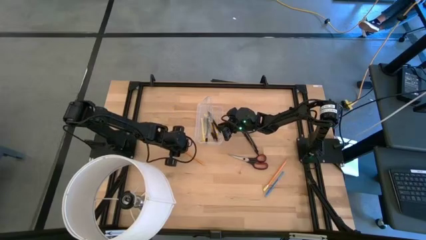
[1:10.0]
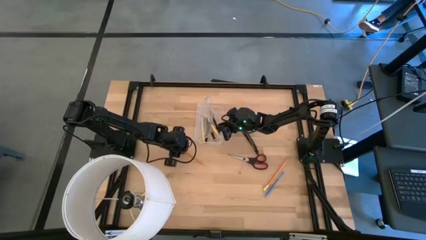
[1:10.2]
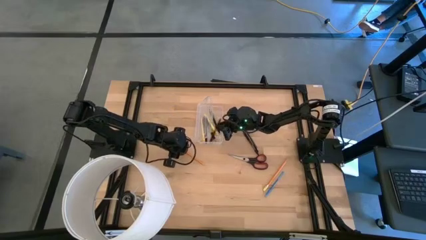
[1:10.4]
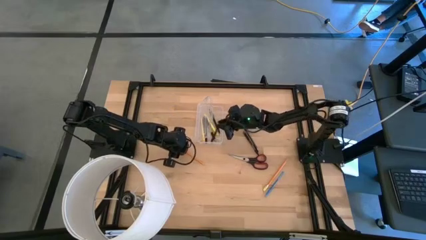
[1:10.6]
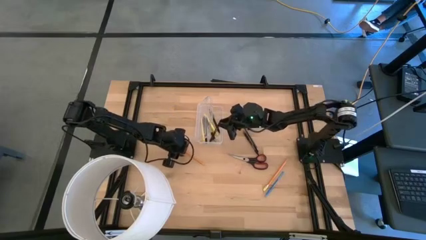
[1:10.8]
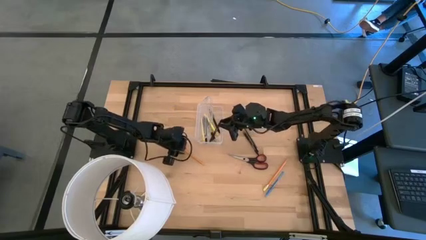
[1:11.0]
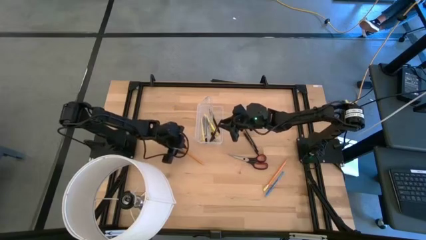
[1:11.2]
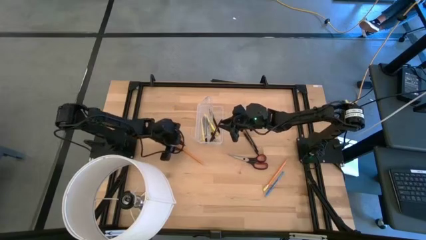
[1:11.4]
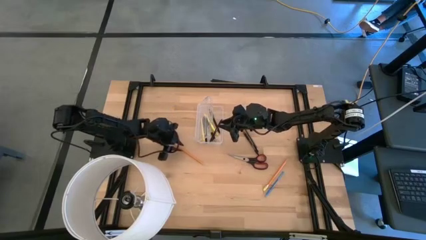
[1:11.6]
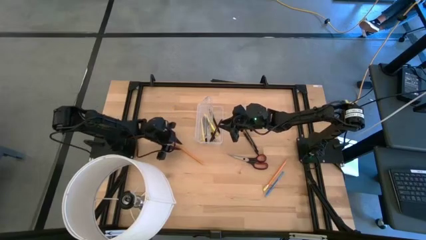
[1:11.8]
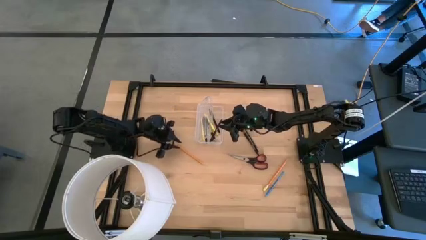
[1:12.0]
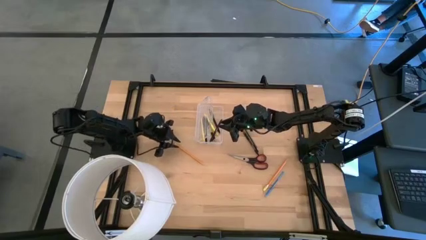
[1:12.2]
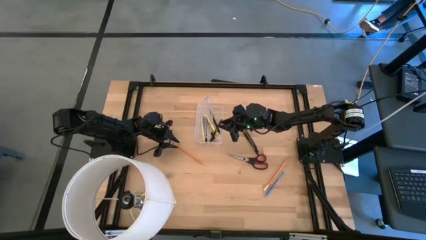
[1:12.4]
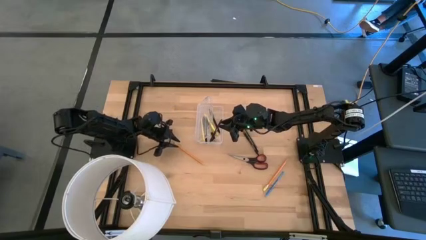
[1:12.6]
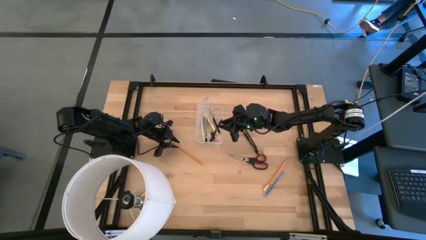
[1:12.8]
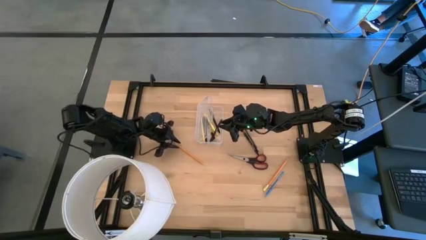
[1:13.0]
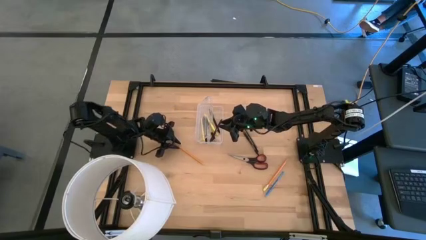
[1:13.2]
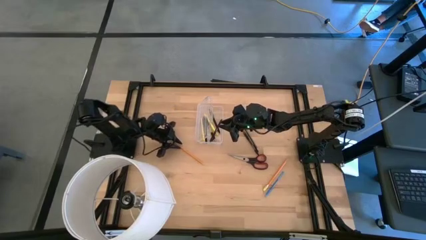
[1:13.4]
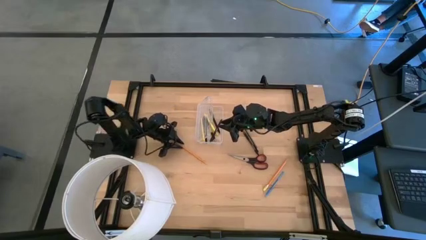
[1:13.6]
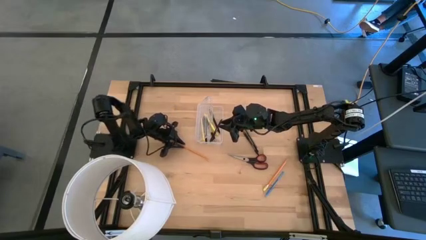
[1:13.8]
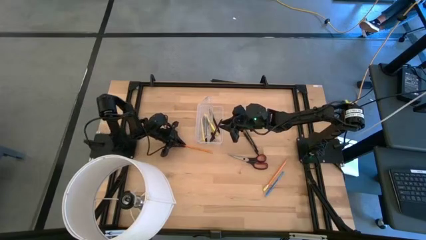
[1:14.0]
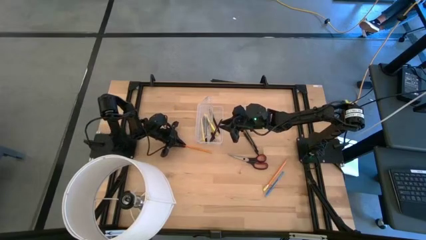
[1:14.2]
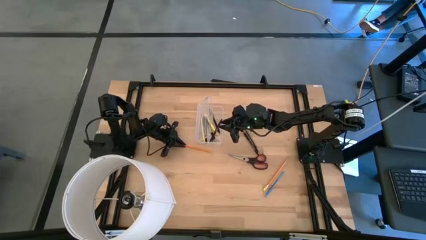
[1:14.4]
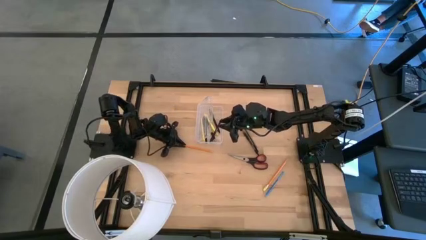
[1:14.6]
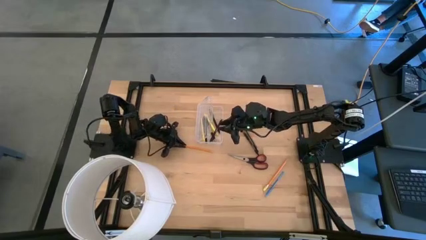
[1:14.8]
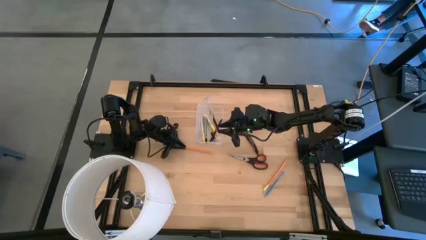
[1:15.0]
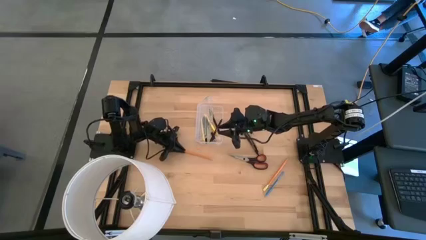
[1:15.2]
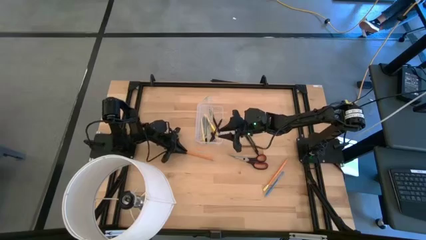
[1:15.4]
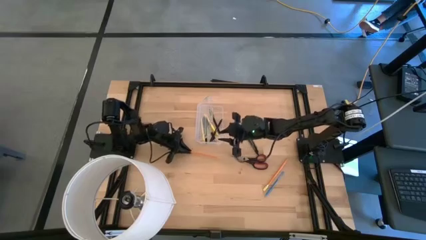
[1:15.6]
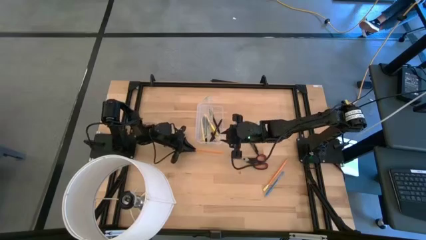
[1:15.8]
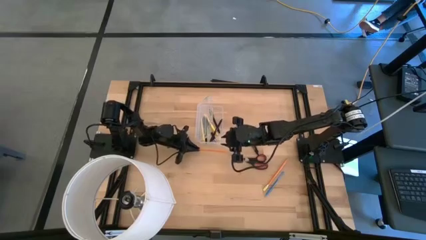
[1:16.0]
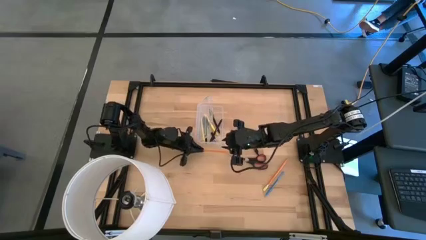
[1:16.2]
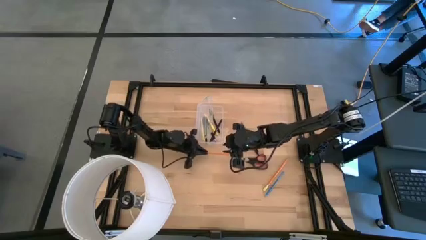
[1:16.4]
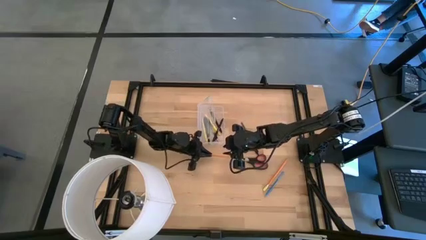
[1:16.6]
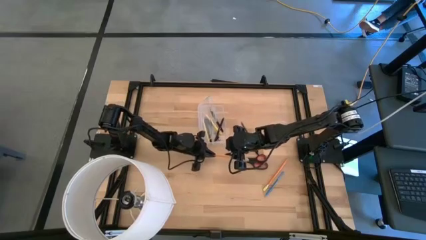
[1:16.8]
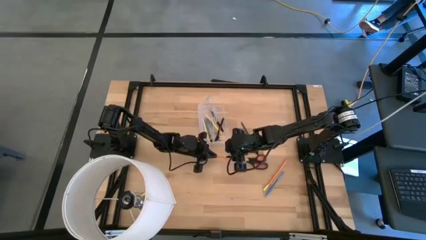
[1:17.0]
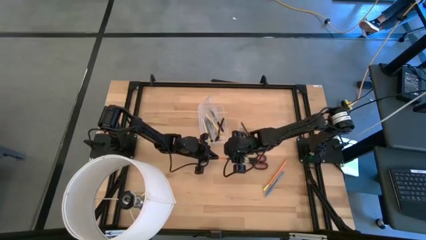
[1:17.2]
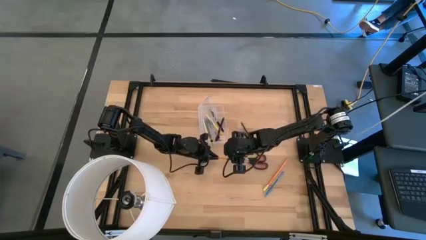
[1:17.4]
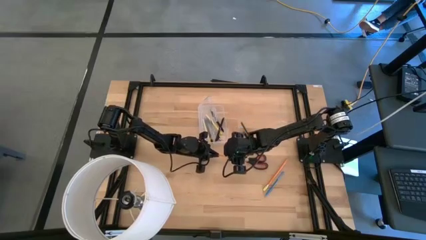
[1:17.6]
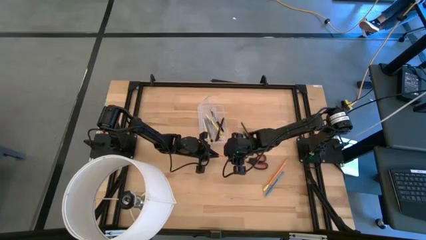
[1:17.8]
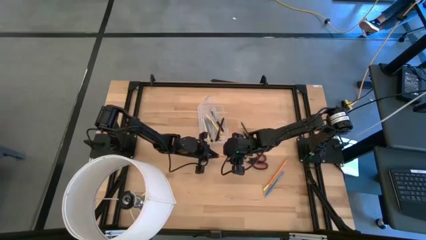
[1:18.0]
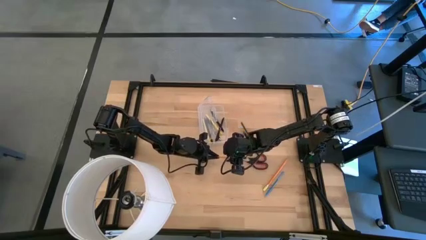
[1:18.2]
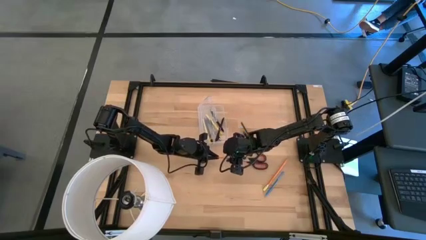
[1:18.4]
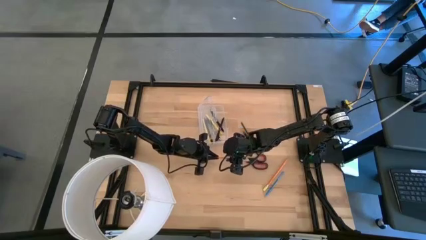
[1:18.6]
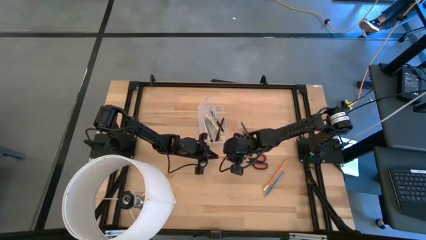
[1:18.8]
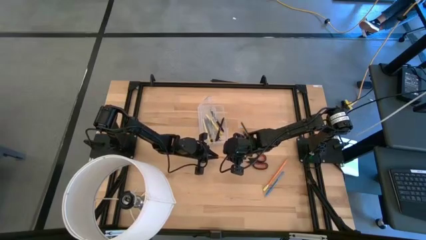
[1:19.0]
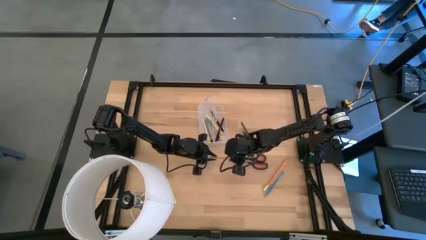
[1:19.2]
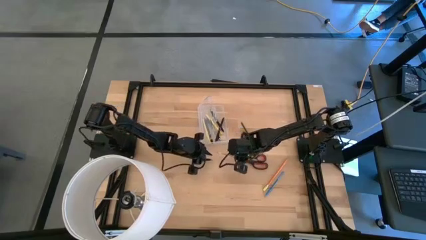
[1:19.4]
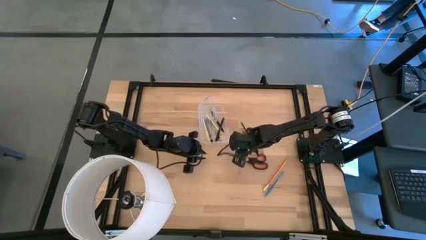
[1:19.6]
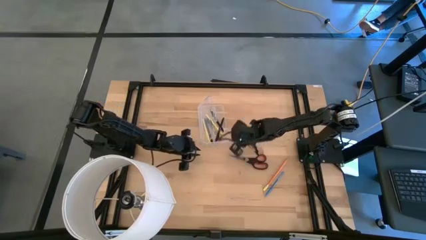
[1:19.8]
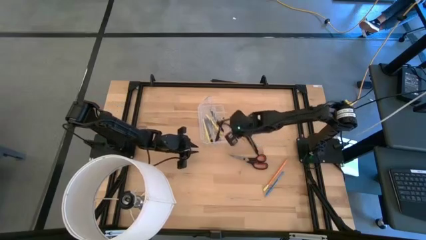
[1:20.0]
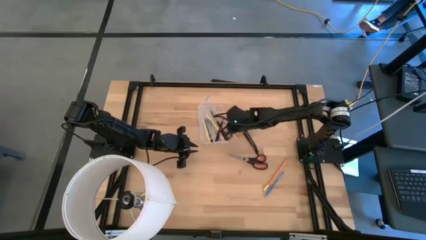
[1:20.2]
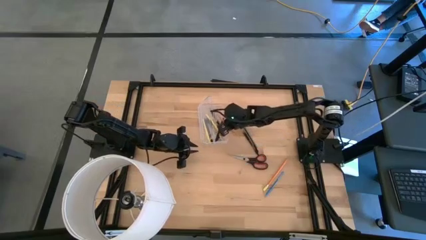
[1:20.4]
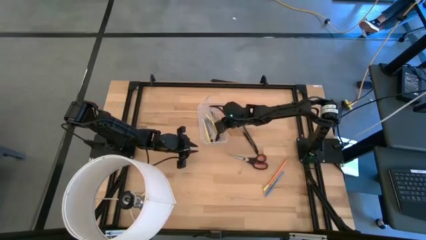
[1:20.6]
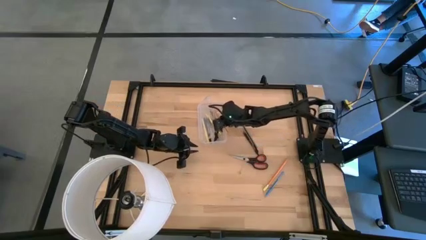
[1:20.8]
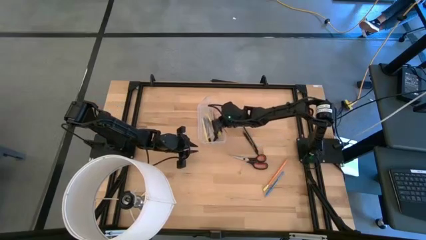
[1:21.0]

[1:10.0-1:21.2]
Task: Pick & place school supplies into a supply box
Put the left orange pencil into the transparent supply box

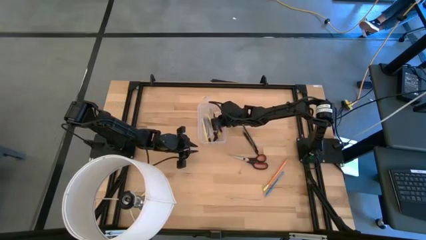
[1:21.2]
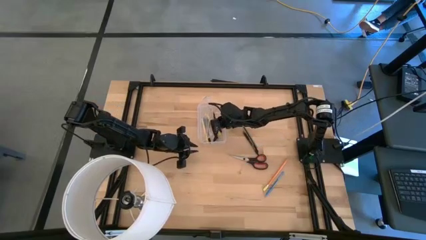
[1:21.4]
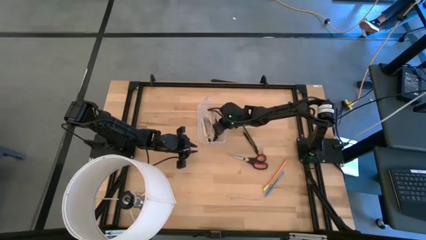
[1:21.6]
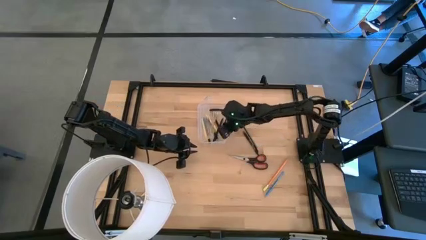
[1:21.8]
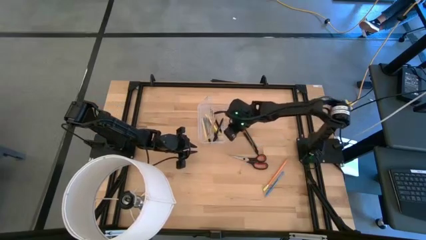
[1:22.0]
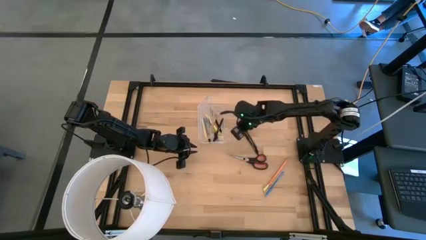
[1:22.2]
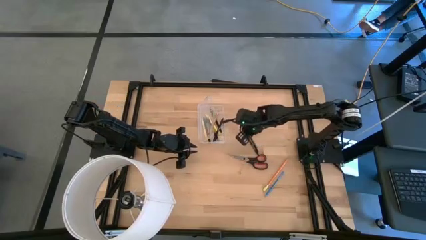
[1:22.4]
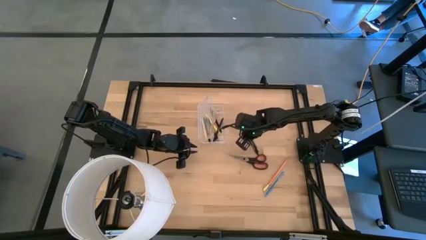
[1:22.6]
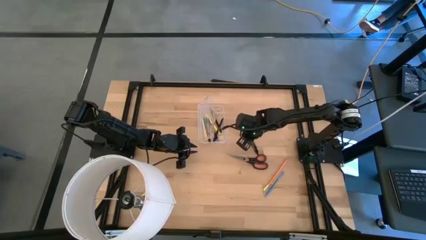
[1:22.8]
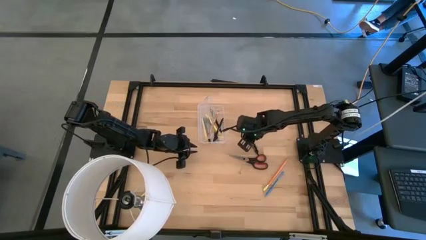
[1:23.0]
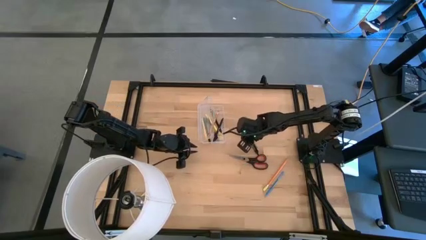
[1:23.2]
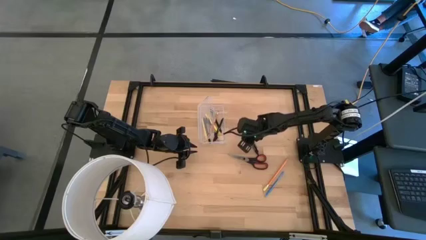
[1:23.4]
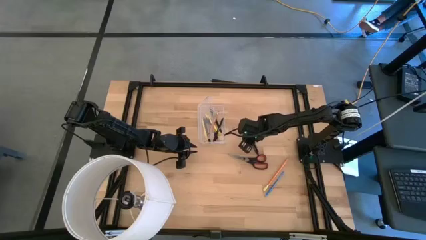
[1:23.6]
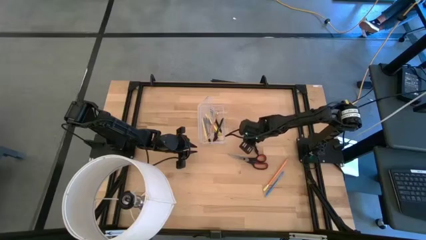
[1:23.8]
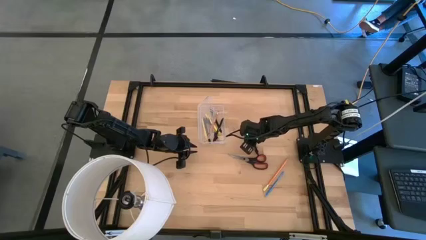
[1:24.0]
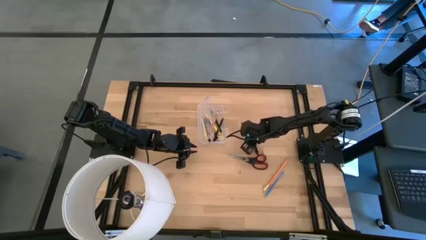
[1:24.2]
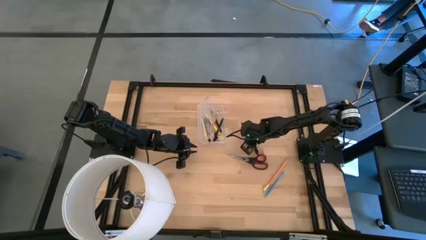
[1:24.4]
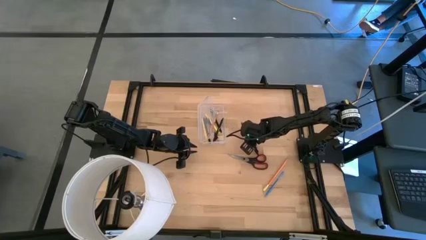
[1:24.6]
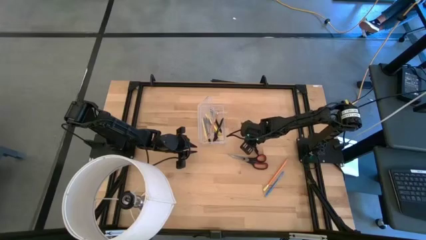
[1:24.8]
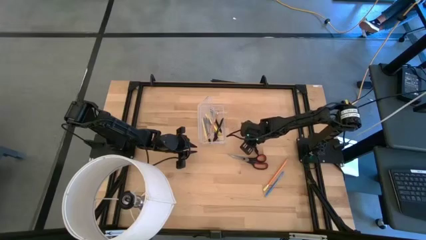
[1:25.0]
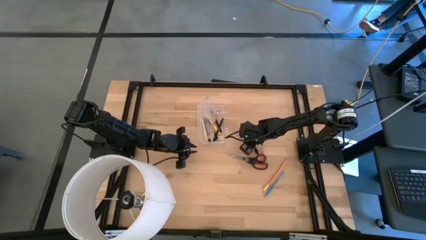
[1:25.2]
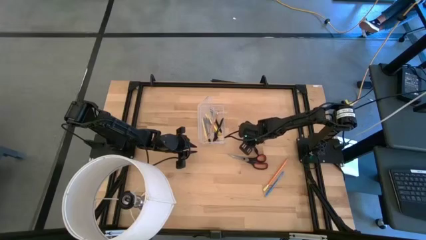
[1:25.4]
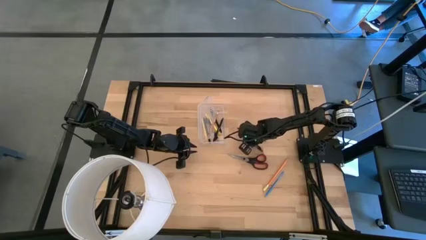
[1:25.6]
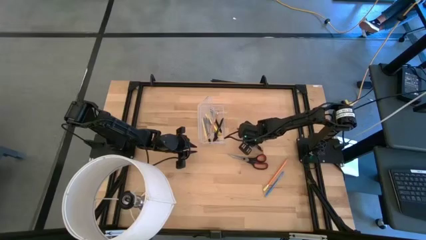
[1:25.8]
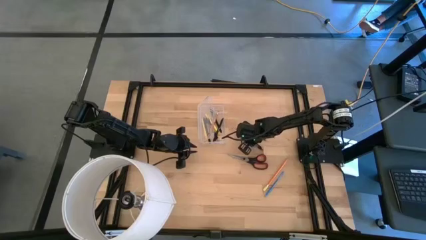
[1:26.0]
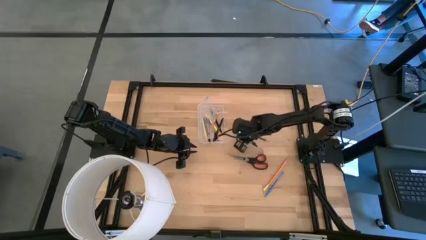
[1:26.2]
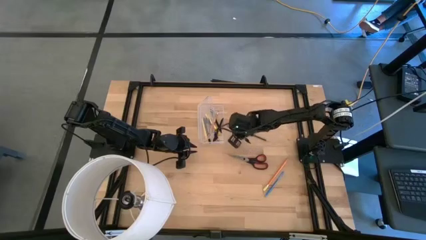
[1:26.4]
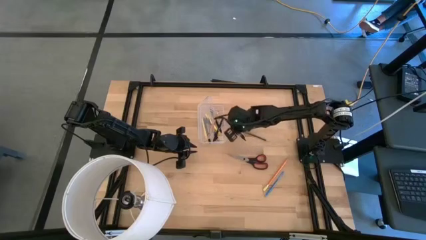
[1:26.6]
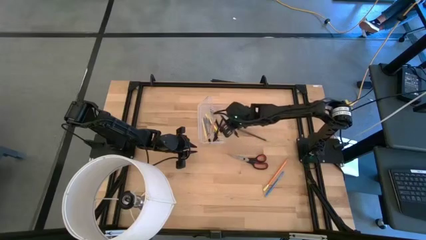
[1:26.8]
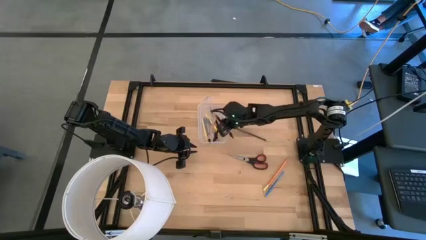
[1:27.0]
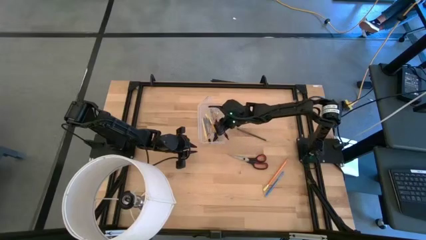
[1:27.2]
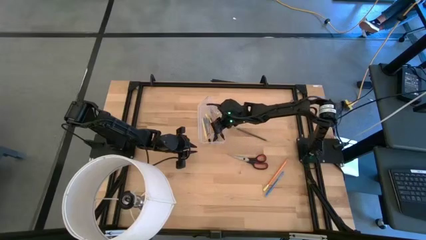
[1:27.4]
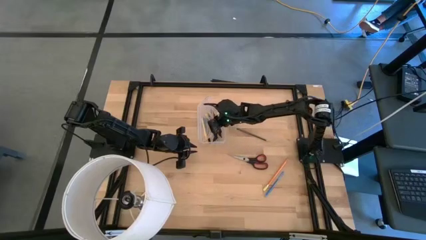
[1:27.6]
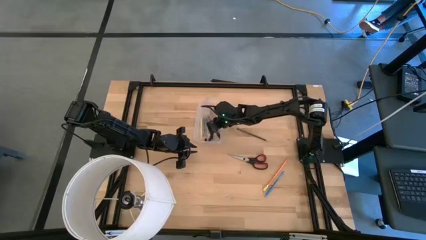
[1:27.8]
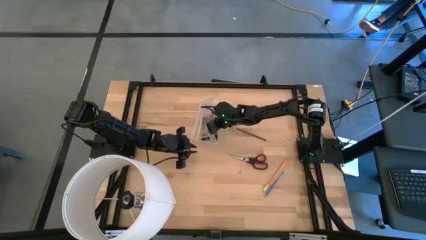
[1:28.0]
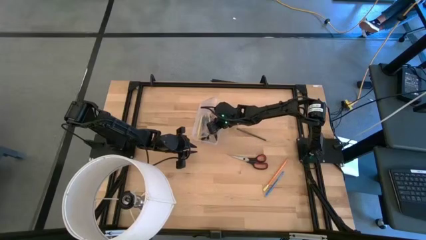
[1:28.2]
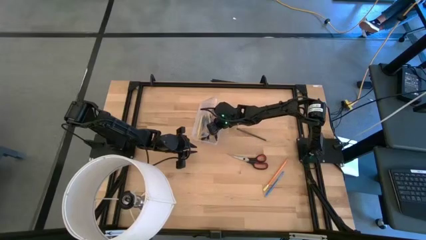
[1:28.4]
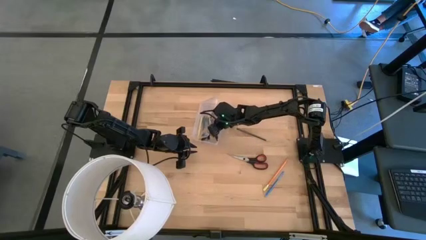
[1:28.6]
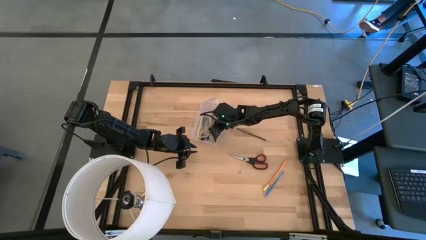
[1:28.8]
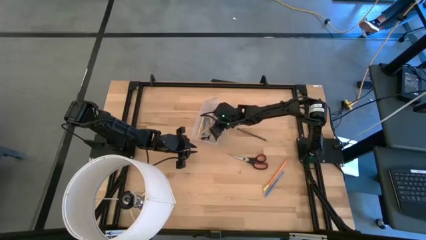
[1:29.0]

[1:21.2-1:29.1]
Put the black transparent pen into the transparent supply box
